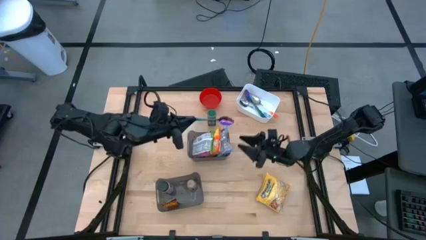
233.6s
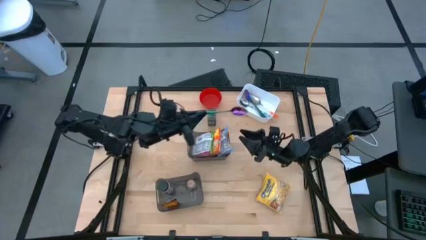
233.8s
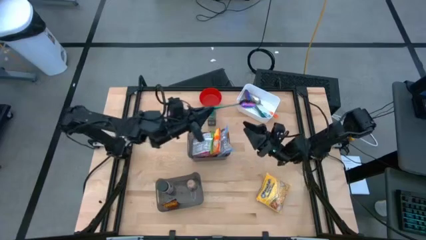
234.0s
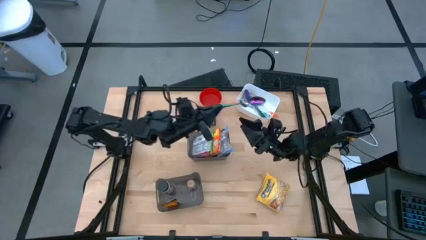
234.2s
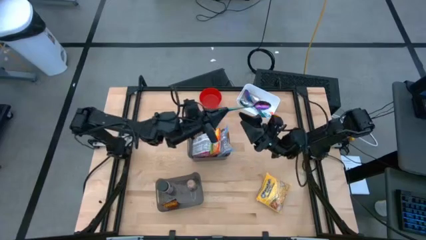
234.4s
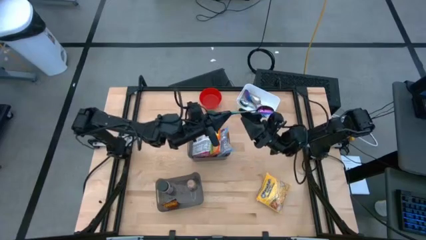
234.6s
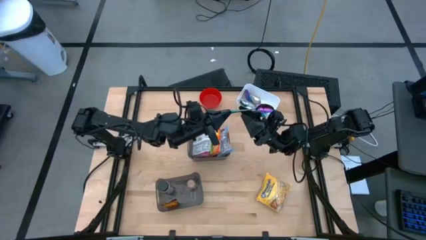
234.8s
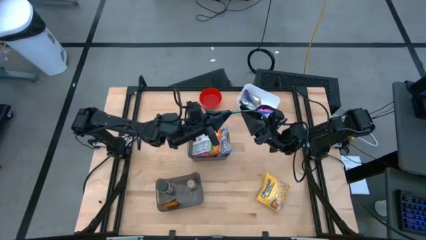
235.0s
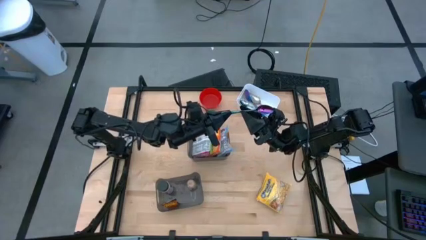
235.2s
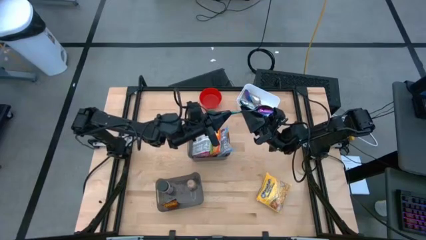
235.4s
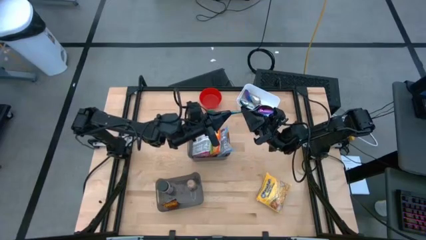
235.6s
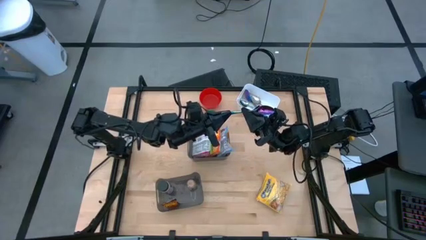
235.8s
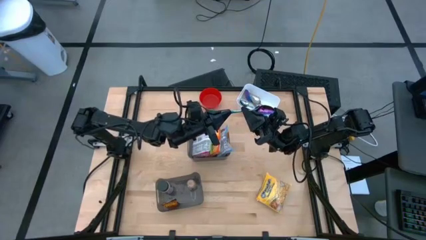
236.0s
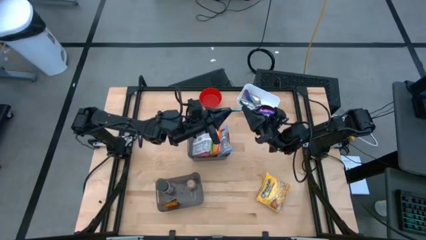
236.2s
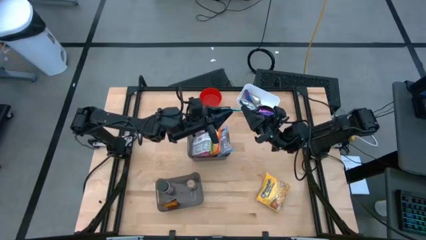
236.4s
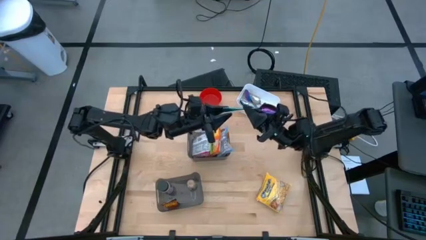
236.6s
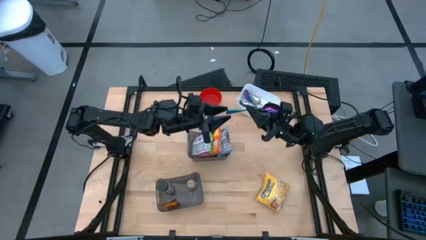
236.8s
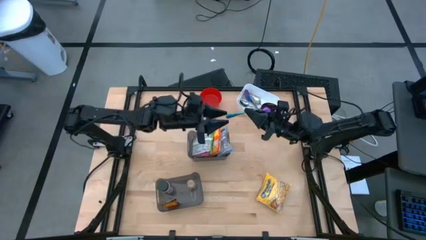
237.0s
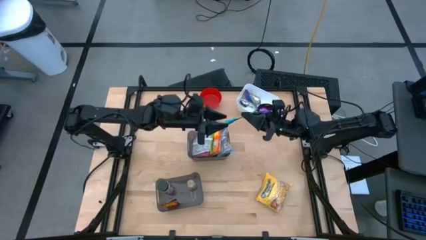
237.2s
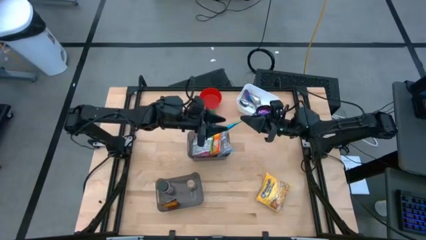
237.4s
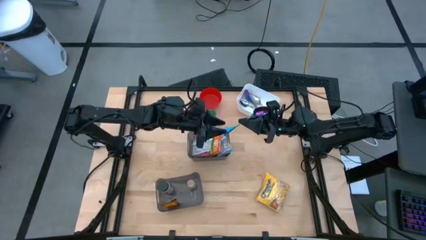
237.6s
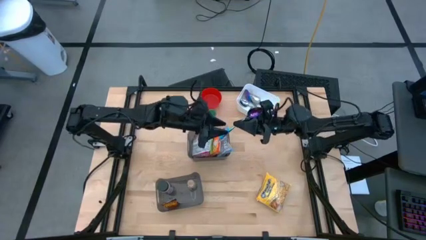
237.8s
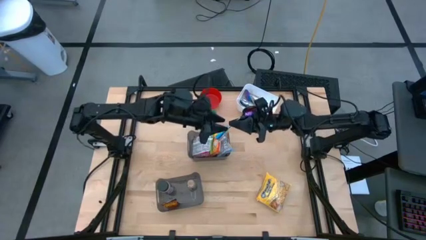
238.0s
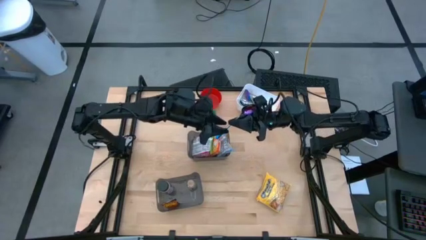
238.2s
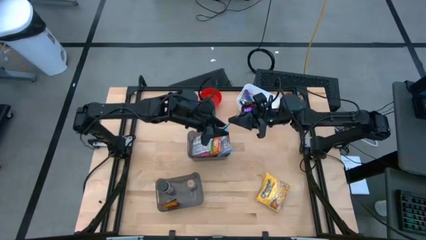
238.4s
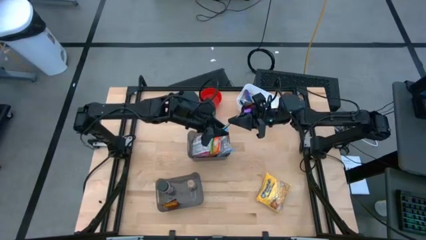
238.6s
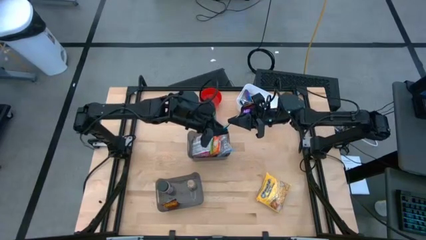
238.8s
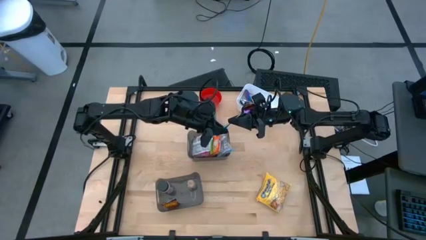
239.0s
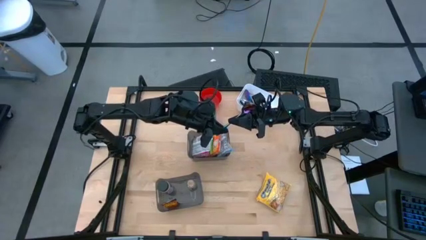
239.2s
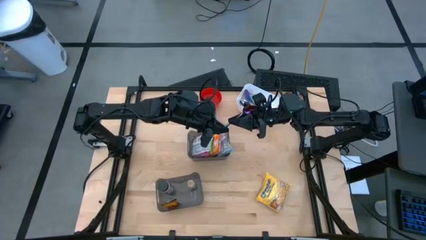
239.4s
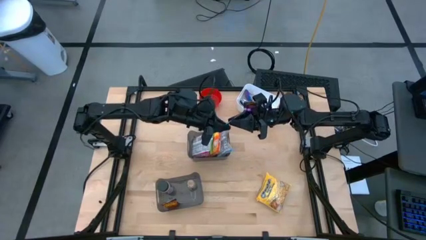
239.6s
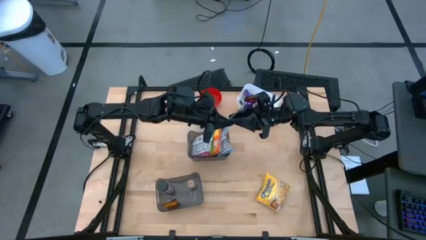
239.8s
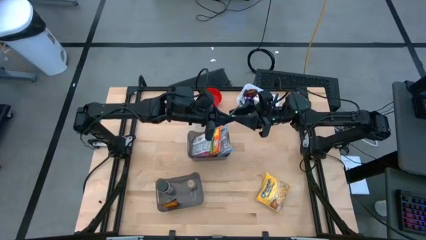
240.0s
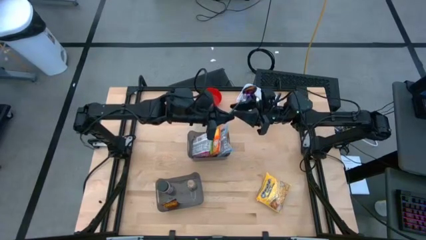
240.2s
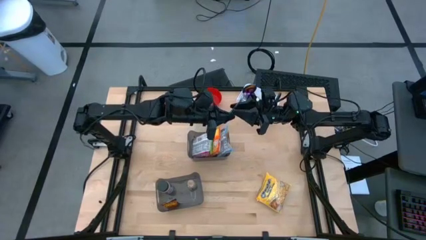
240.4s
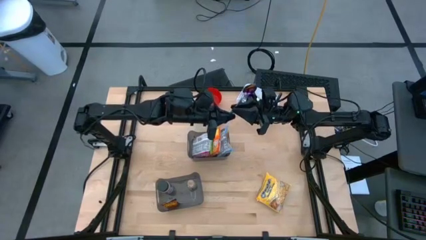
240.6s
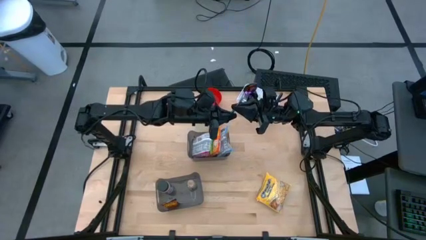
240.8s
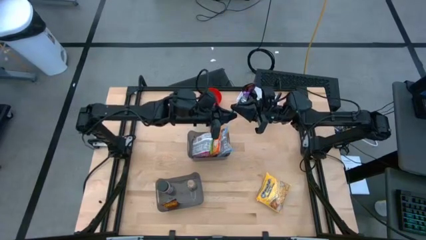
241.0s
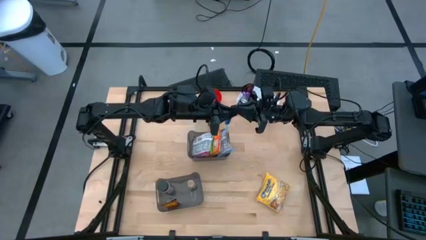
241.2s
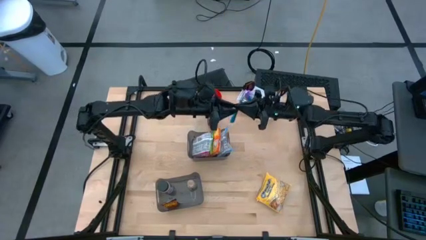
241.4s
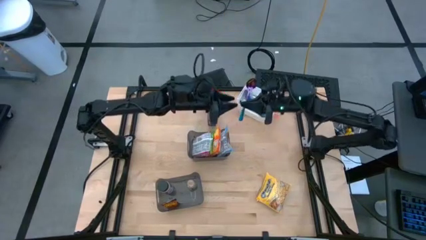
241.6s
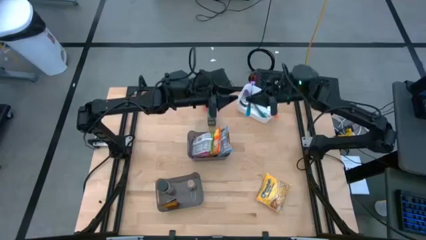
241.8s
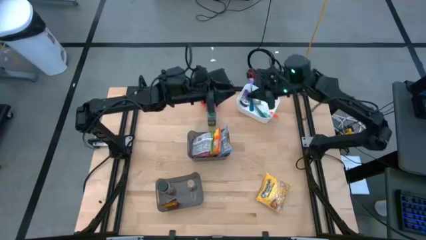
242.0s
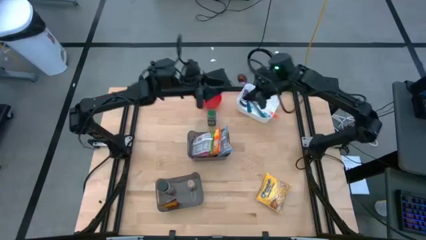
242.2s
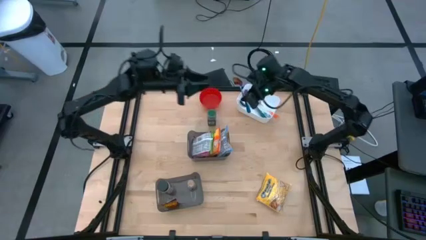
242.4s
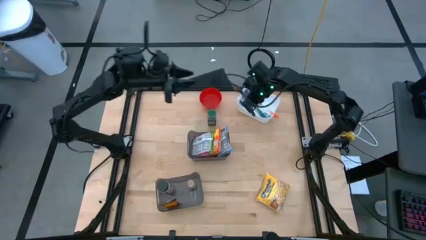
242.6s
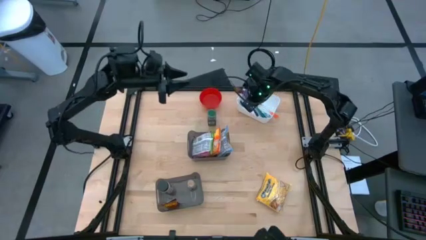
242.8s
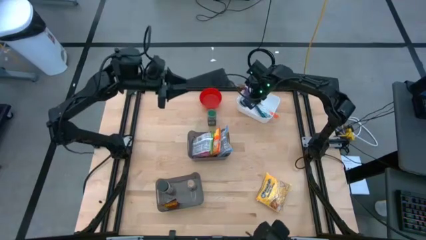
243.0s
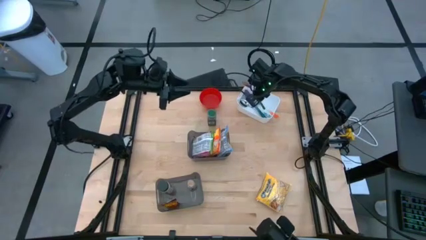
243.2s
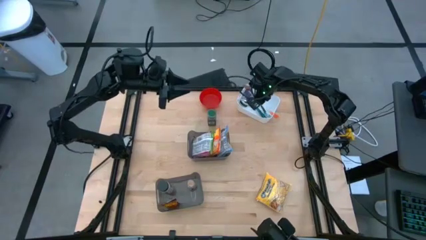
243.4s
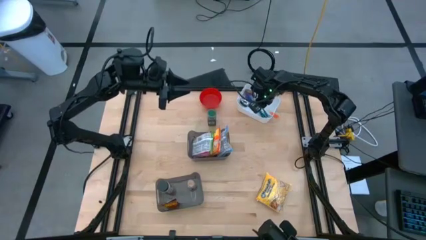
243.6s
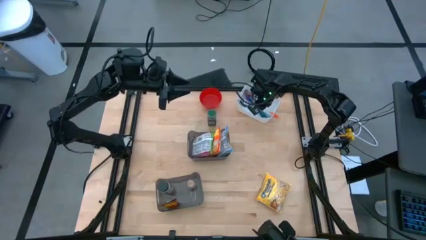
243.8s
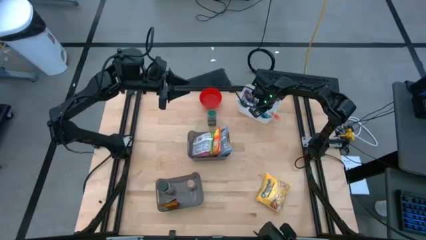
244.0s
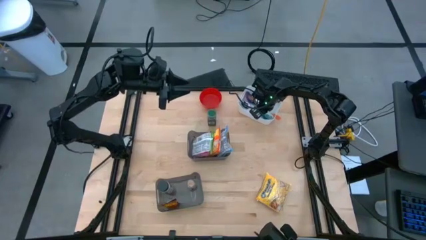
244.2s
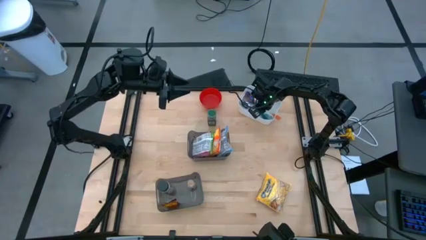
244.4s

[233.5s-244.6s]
Task: Pick & Place Food Item
Put the purple spoon into the white bin

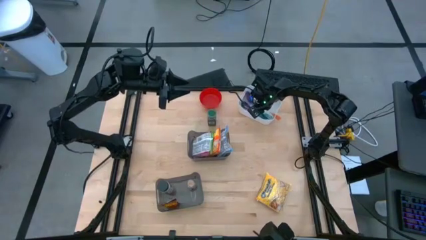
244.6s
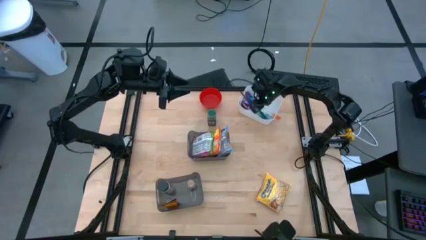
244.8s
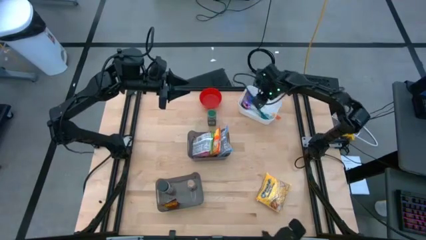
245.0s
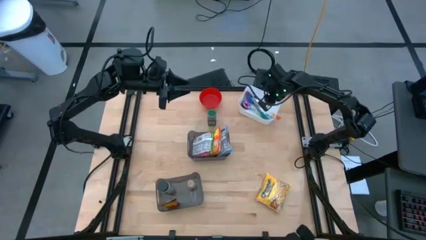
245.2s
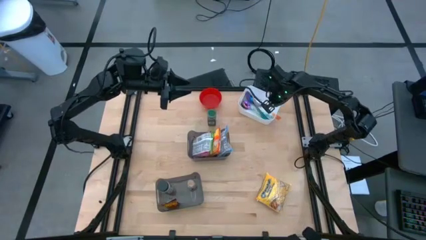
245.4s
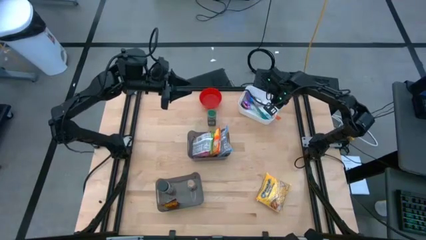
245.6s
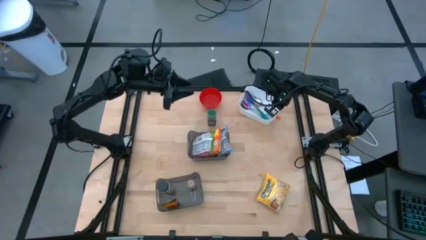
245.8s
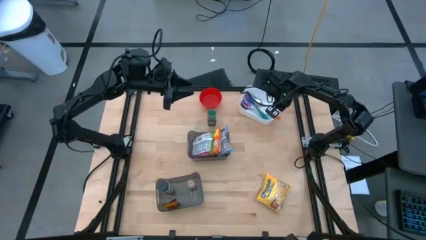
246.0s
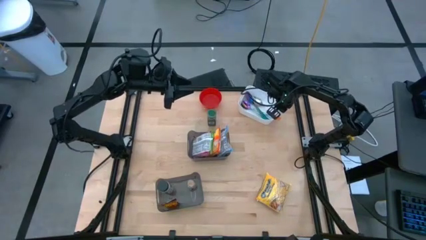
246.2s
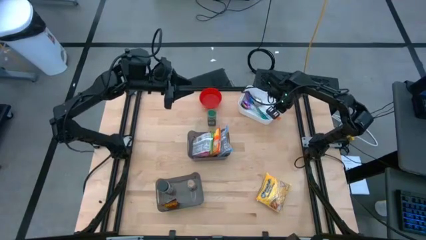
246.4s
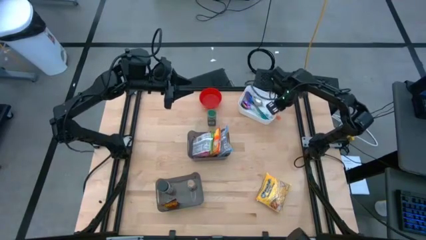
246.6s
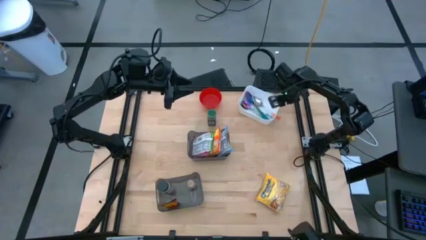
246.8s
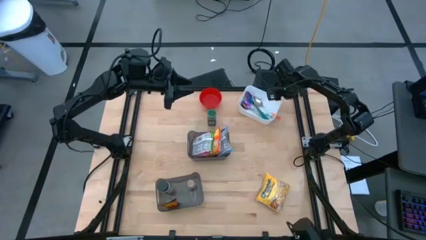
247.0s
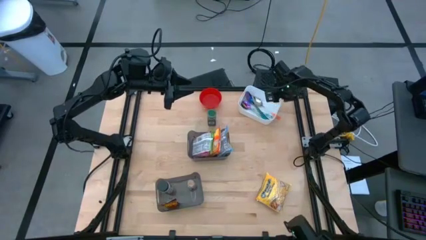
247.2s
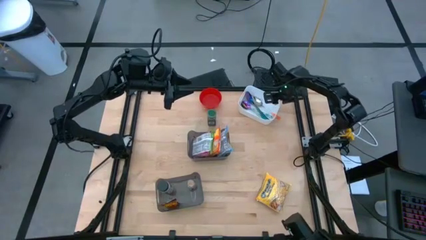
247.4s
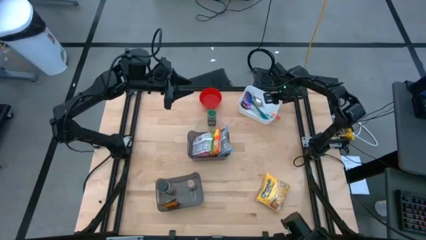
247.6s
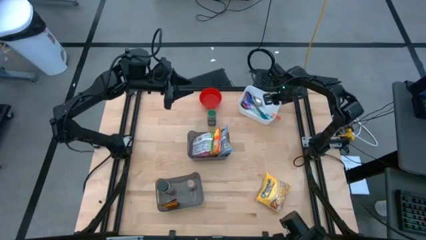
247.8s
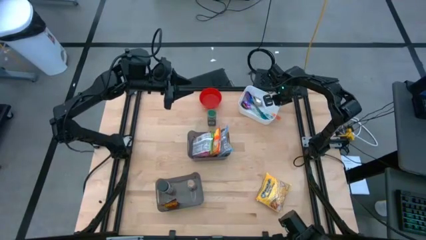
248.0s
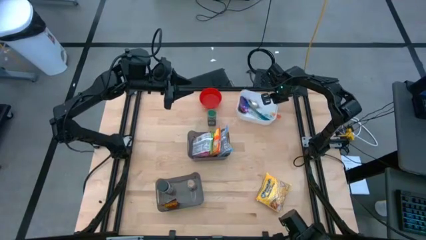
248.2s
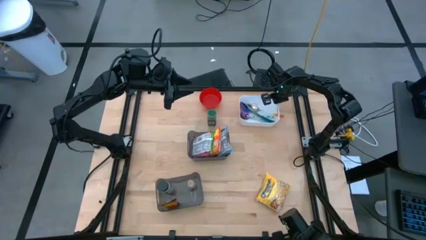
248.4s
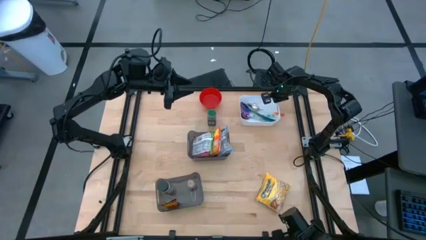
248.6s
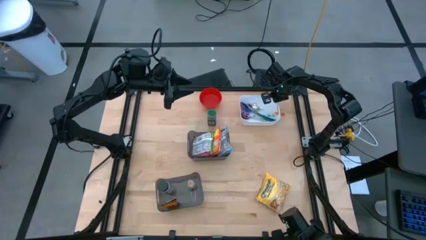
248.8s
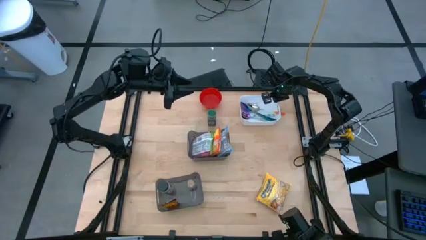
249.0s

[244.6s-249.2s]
Adjust the white bin
